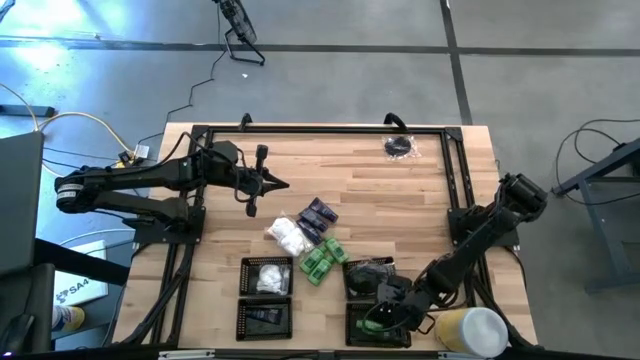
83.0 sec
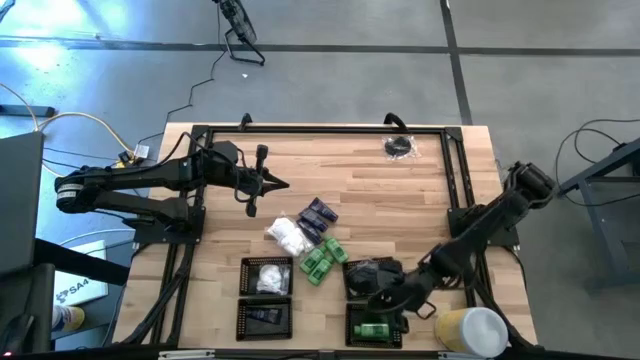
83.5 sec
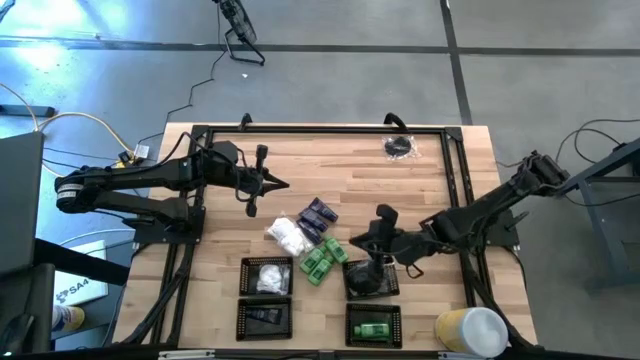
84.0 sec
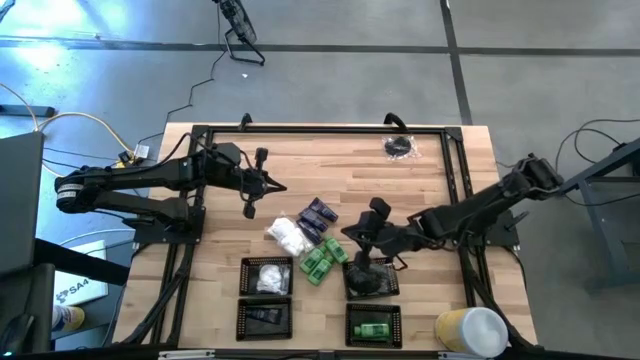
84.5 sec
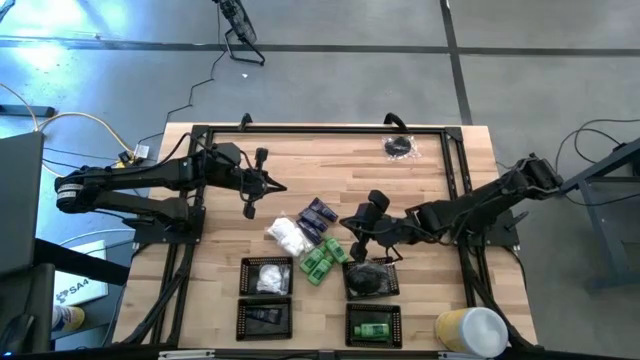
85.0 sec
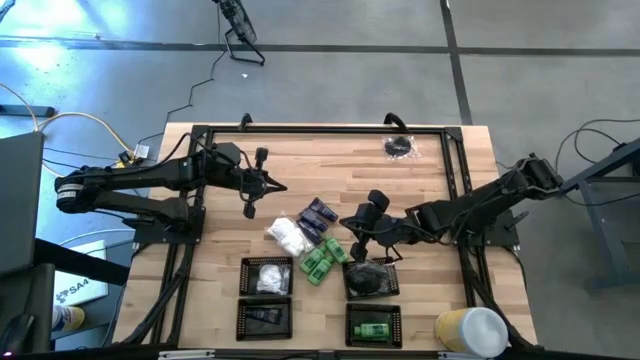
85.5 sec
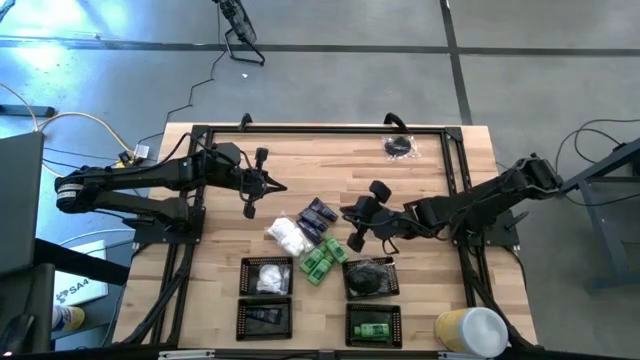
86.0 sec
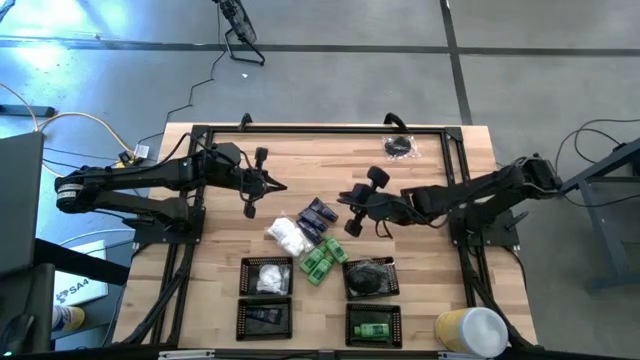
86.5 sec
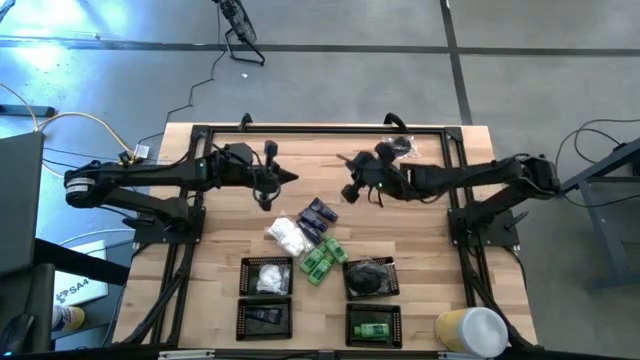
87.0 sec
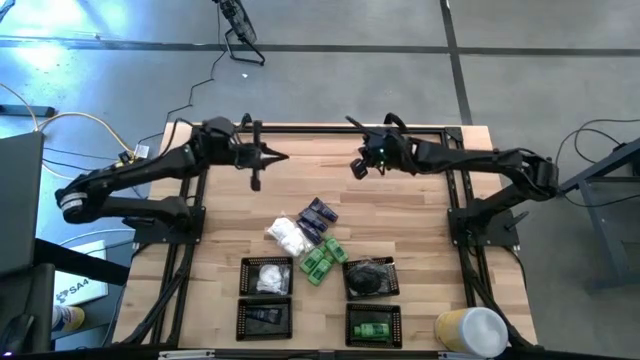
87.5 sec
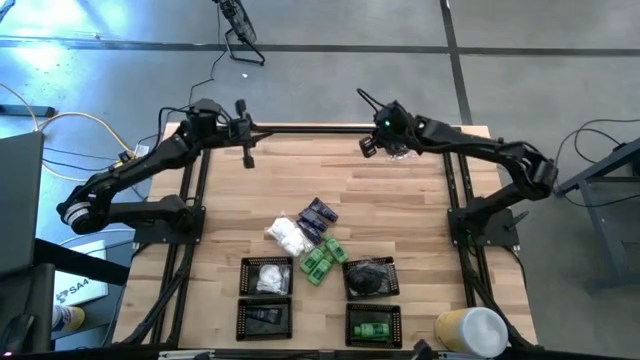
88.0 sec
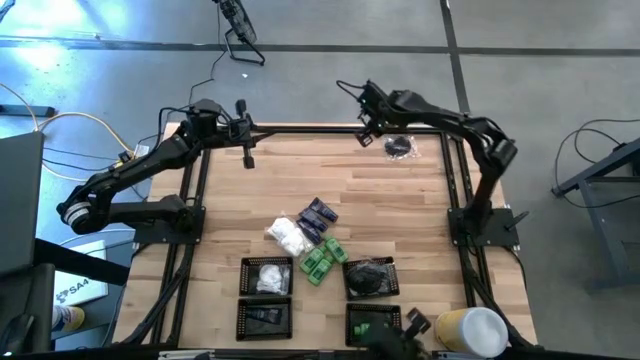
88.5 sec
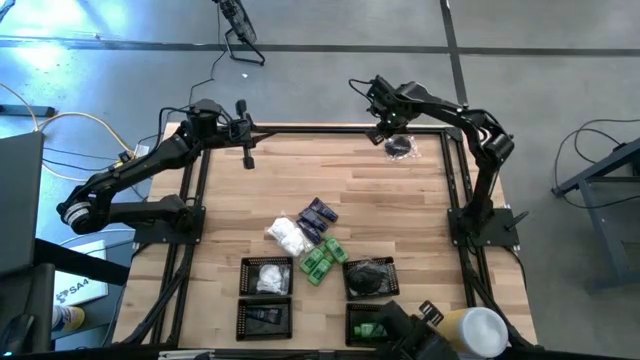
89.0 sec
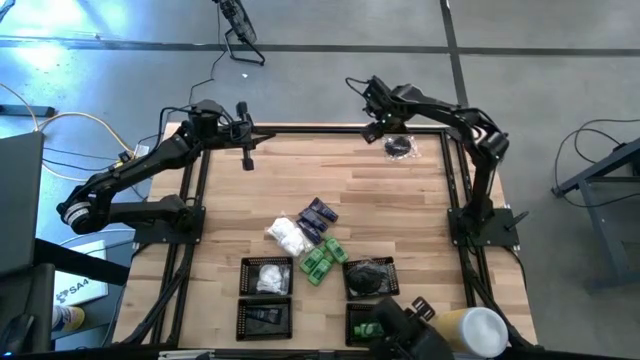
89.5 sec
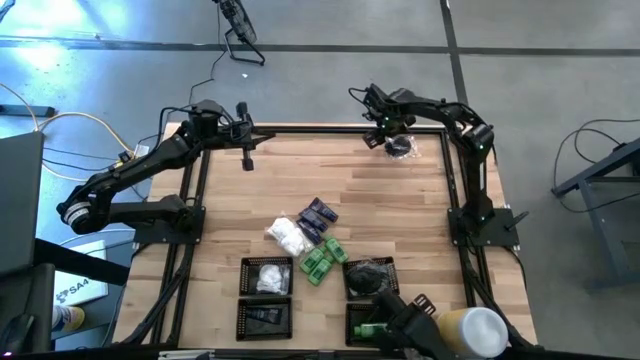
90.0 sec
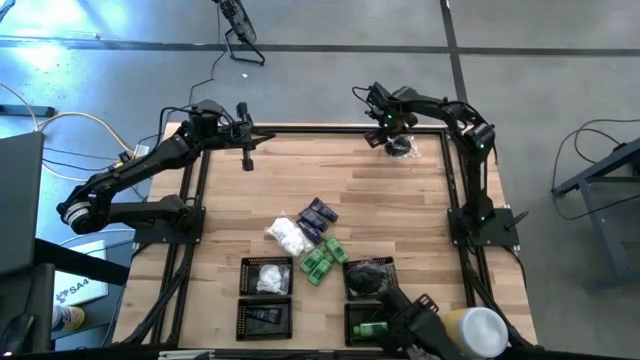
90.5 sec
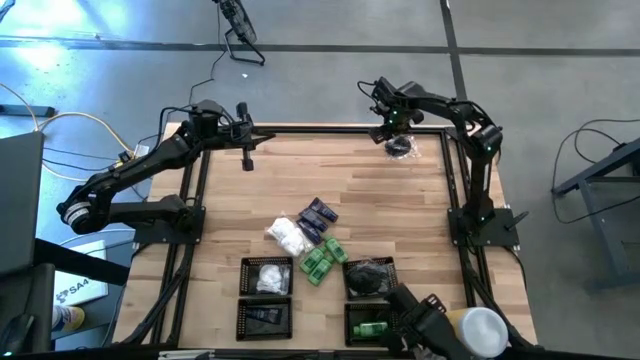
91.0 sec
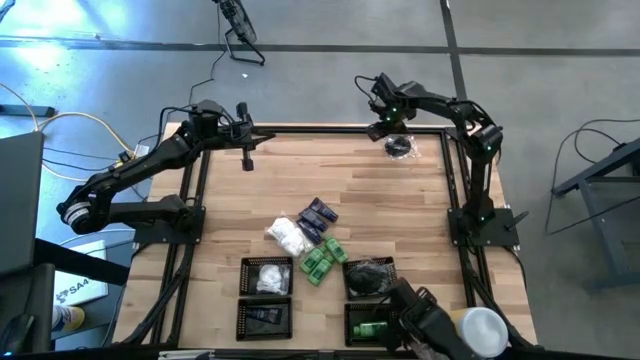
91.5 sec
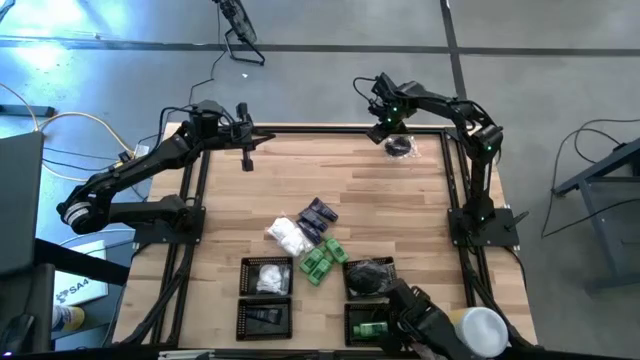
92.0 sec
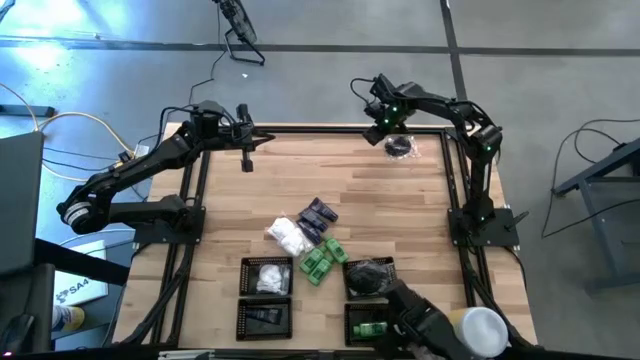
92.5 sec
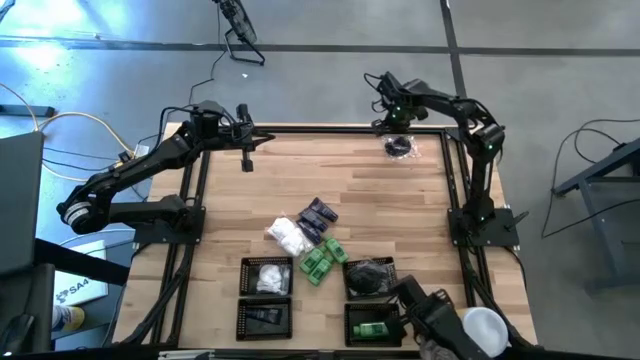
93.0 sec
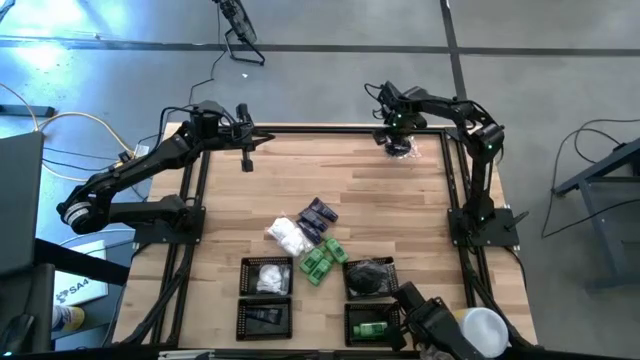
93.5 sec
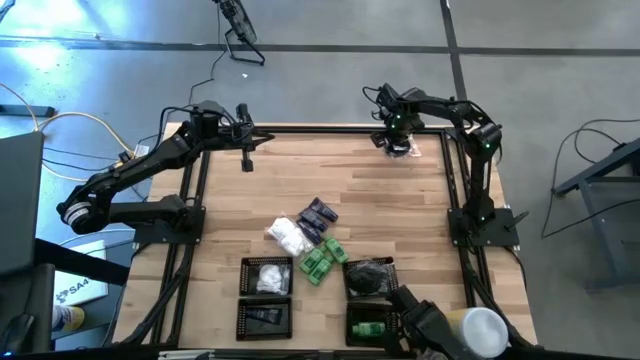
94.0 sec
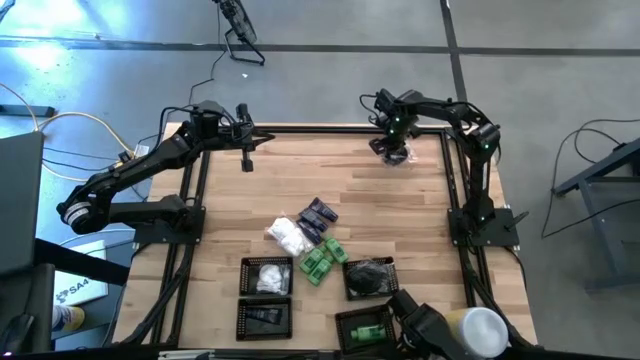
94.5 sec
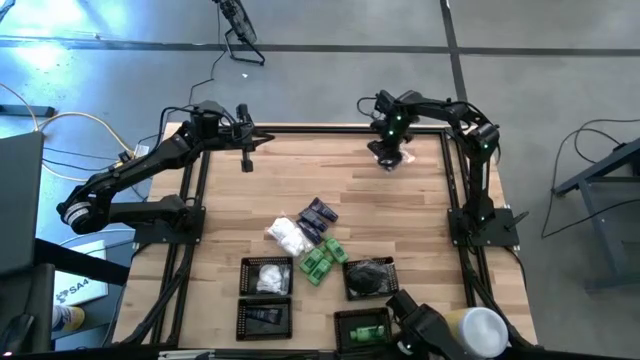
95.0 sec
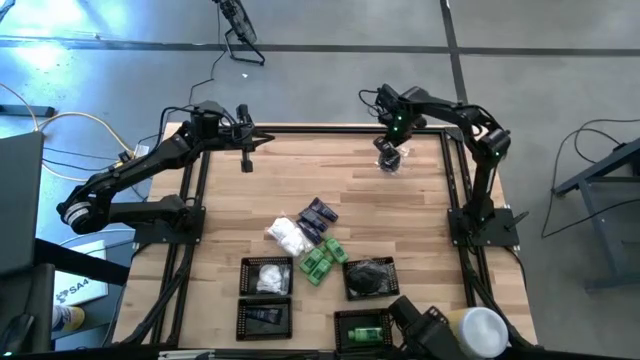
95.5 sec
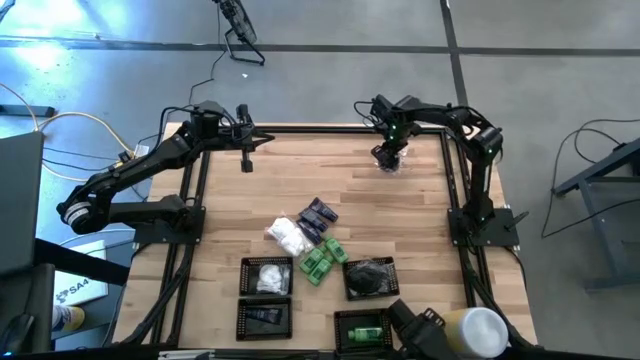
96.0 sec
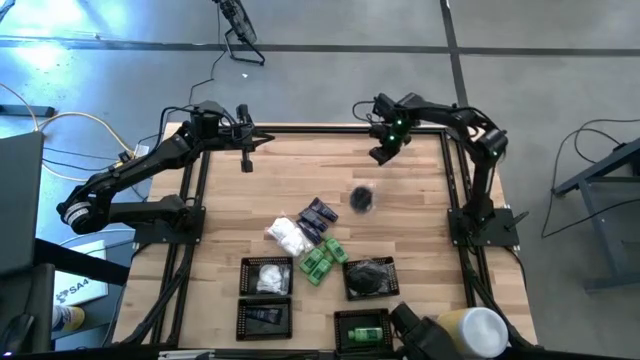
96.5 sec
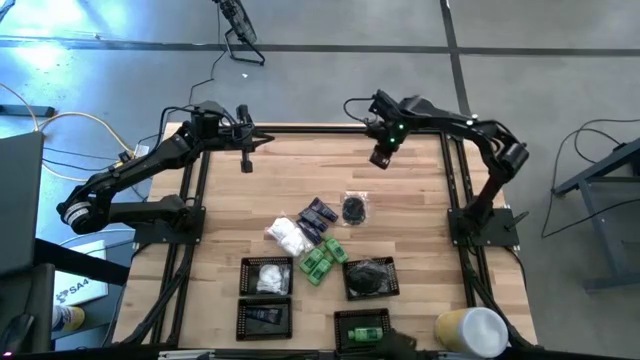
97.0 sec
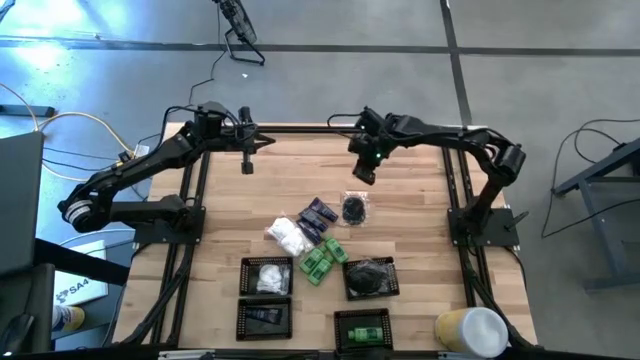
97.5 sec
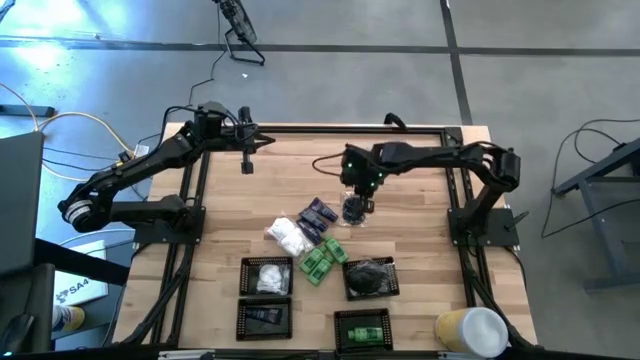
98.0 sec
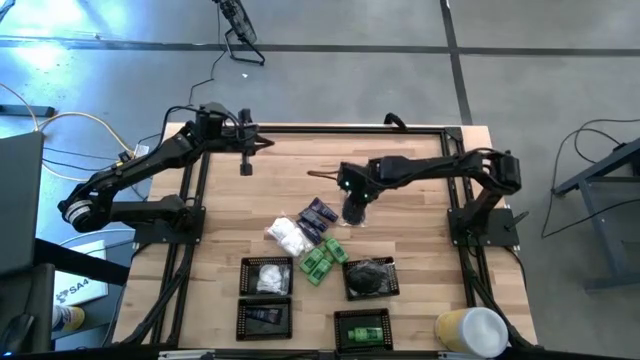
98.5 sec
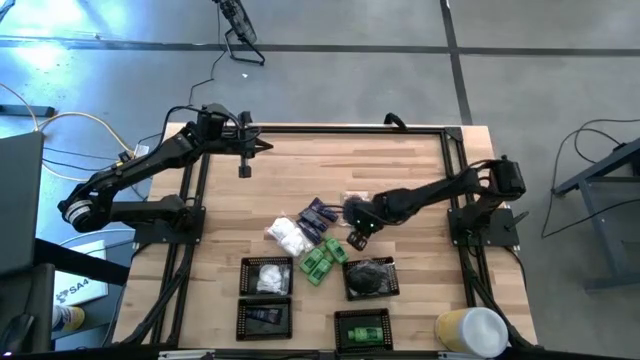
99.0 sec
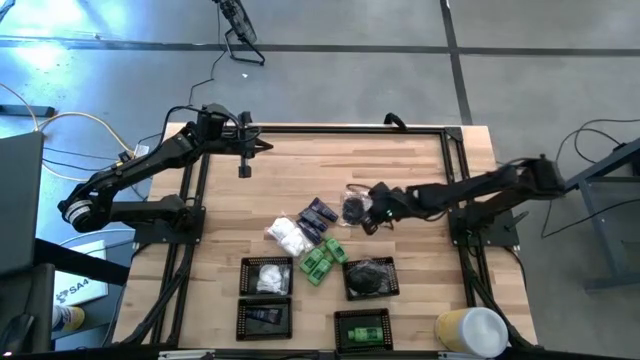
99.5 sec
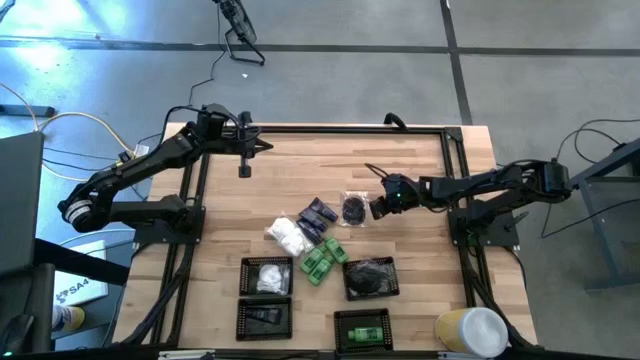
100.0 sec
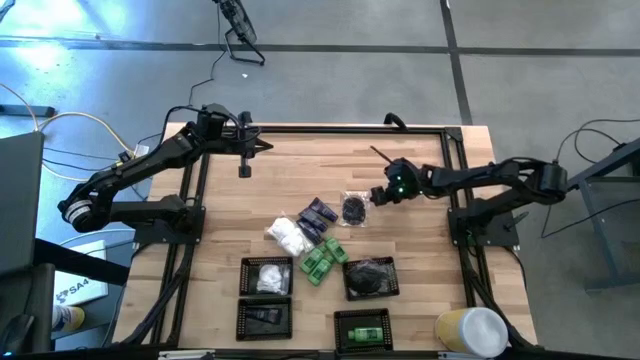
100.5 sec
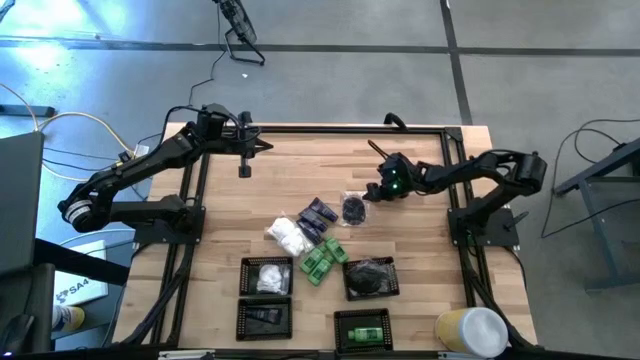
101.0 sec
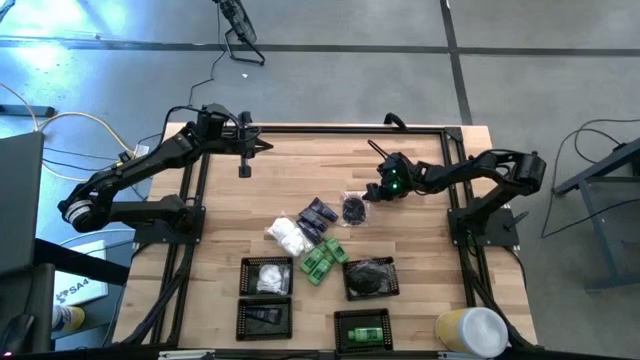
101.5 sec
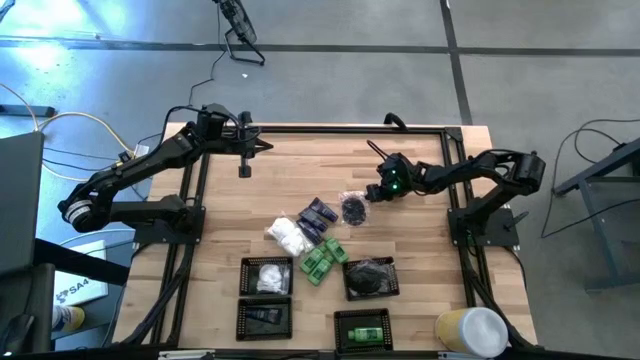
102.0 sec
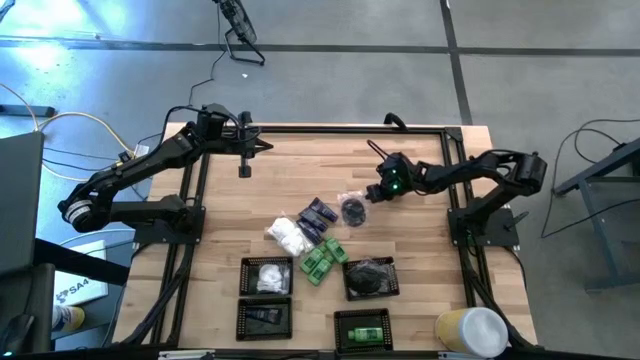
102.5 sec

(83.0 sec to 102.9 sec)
Task: Pick & Place Travel size toiletries
Put the black hairbrush into the top right black bin

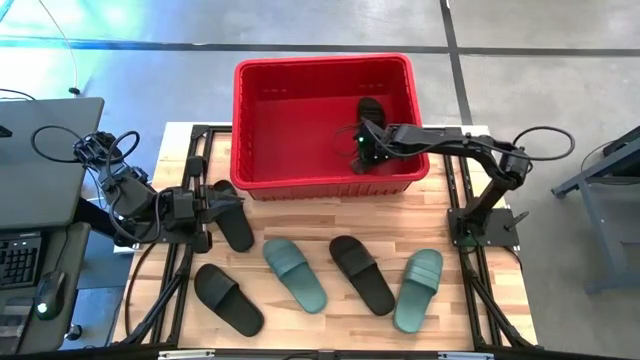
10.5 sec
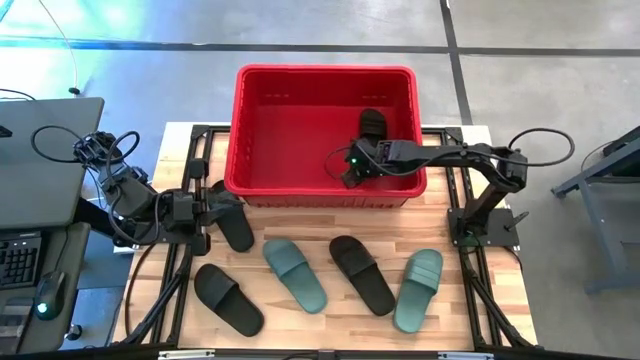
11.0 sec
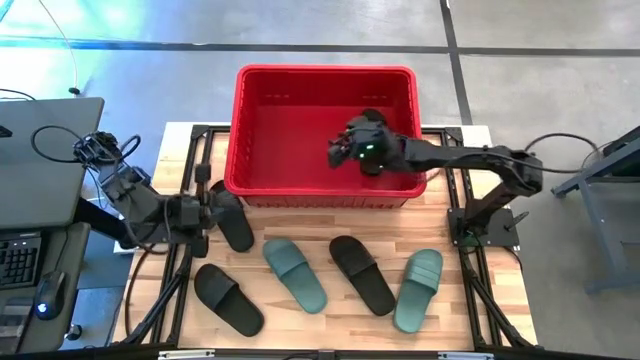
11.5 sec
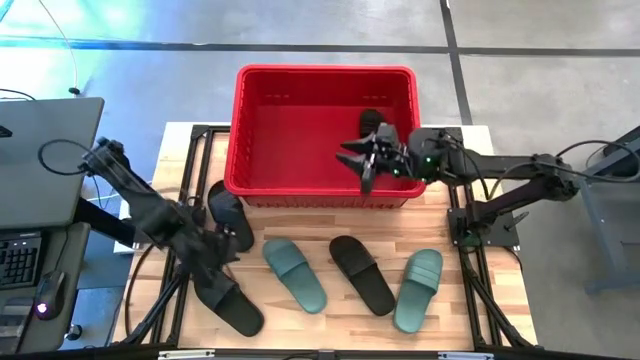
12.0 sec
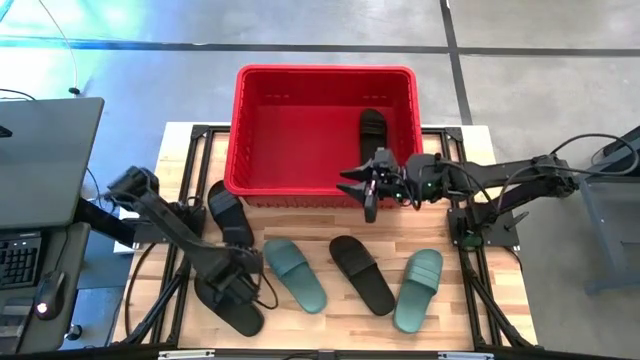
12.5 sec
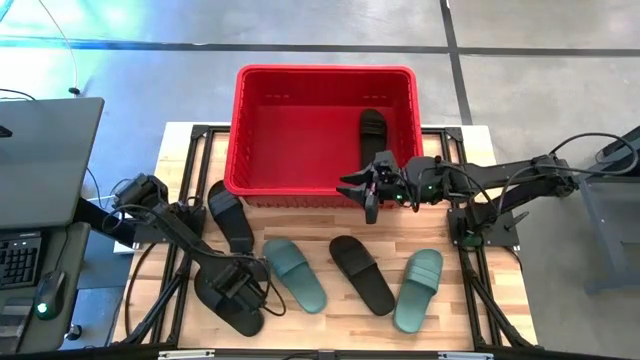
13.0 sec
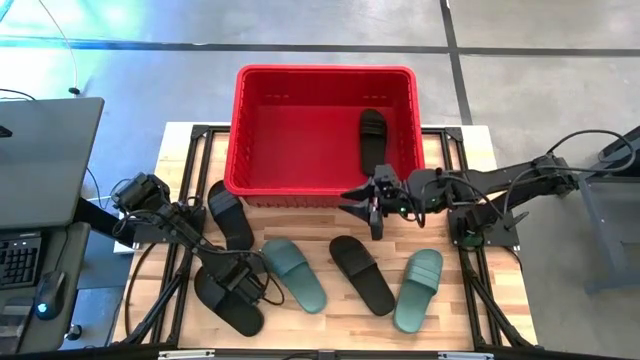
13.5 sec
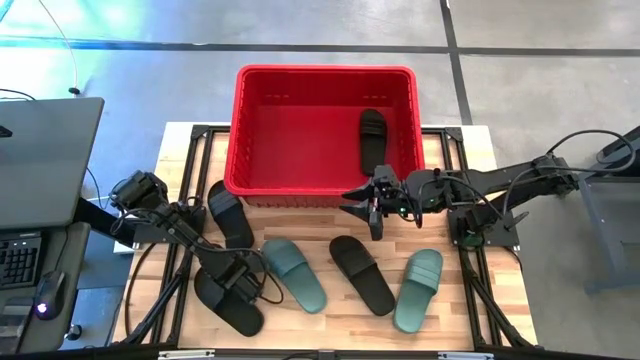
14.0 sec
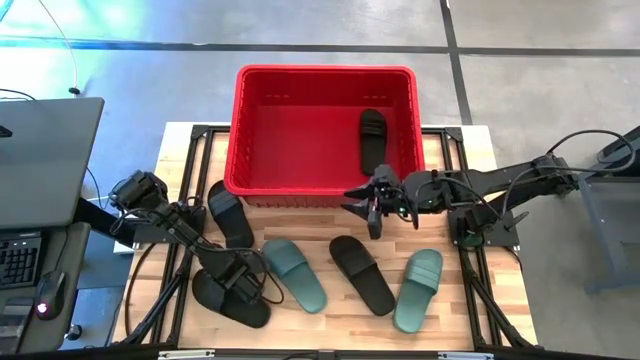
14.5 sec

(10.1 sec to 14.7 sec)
Task: Pick and place slides into bin
Put the black slide into the red bin
